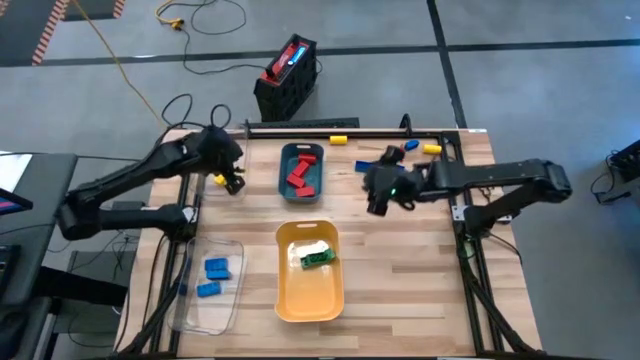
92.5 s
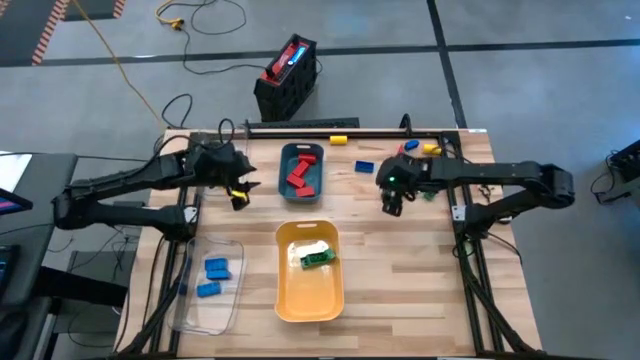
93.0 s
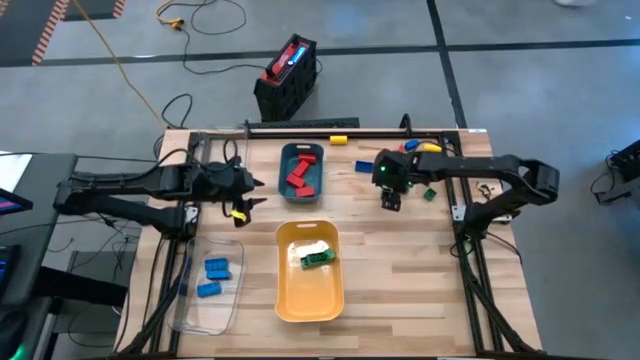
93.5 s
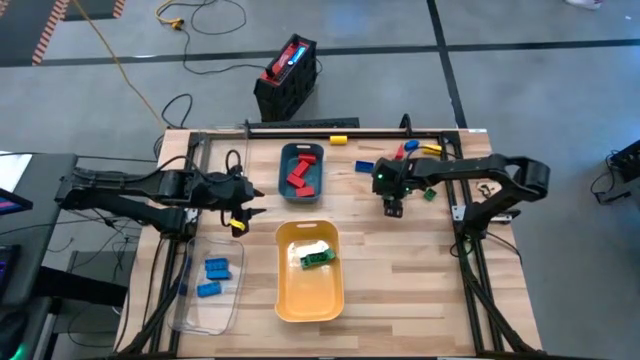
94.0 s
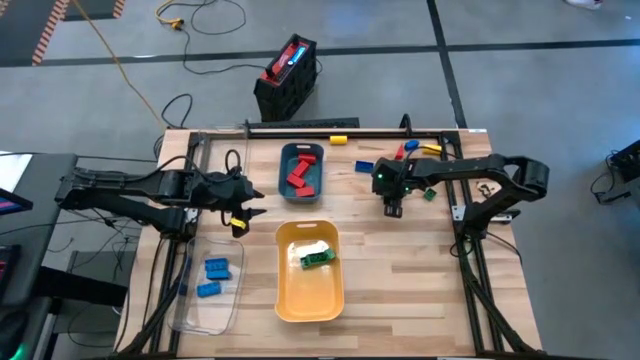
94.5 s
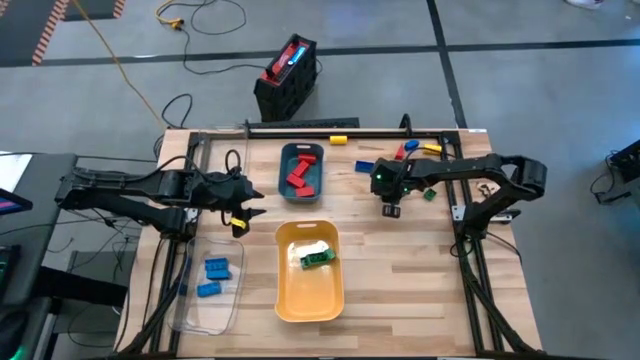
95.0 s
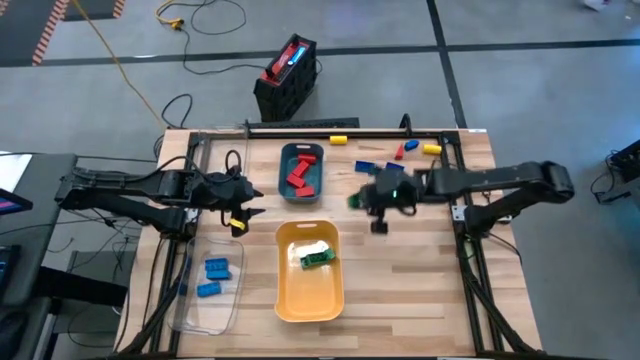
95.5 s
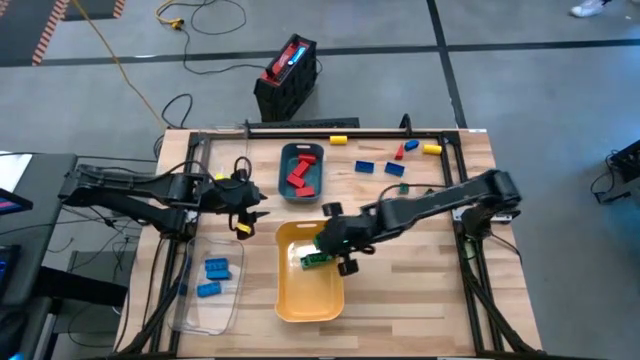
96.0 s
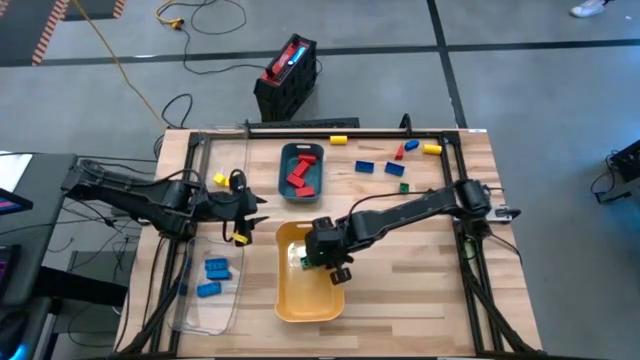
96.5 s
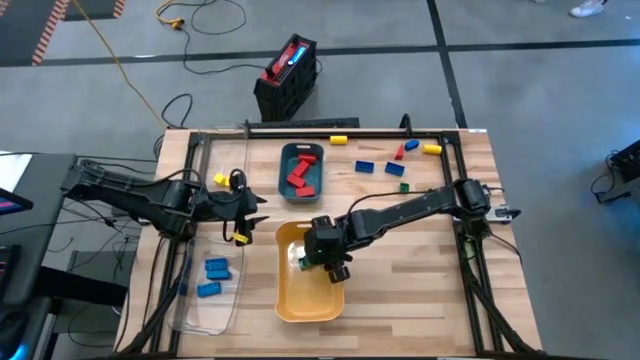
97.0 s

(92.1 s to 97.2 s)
Task: Sort blocks
Put the square green game piece into the yellow bin

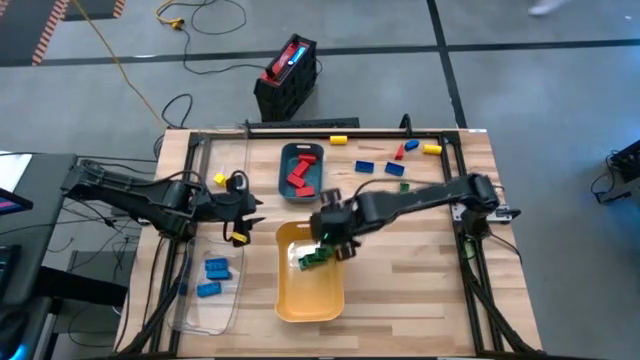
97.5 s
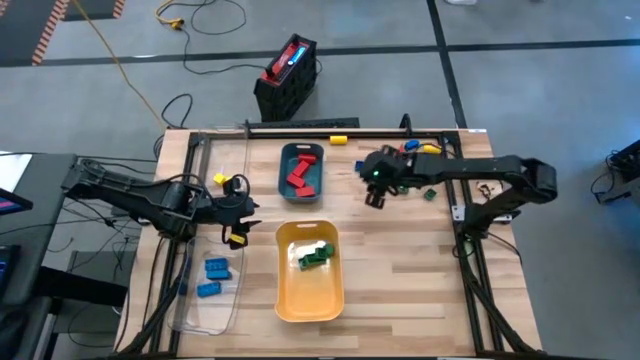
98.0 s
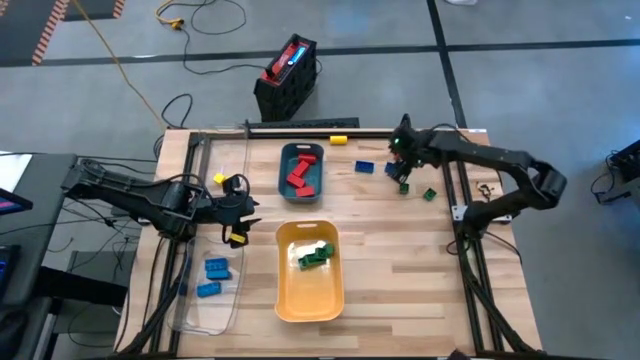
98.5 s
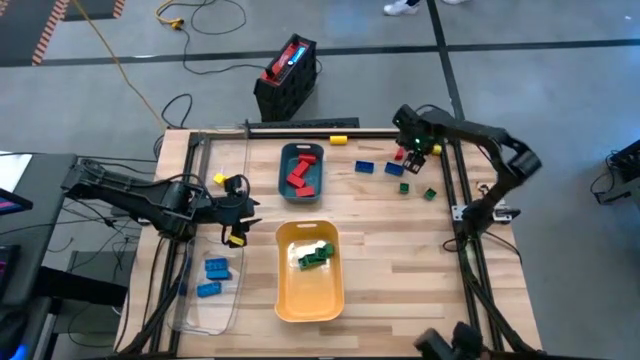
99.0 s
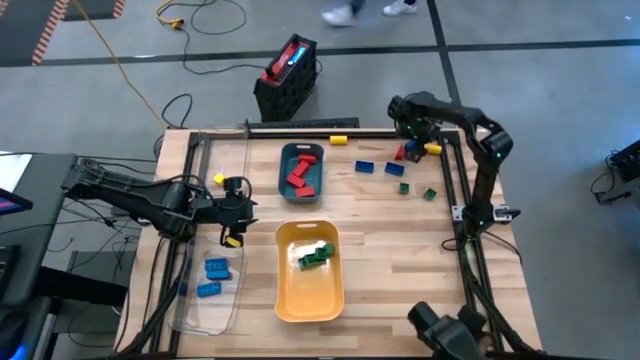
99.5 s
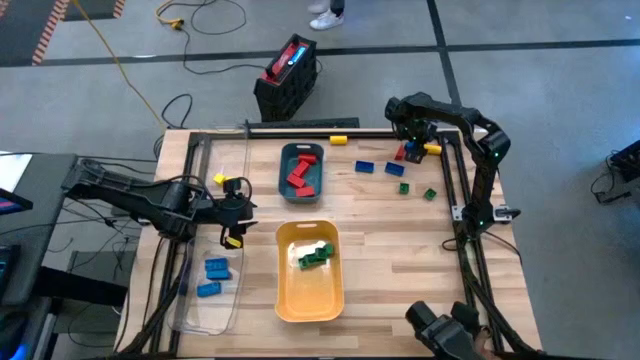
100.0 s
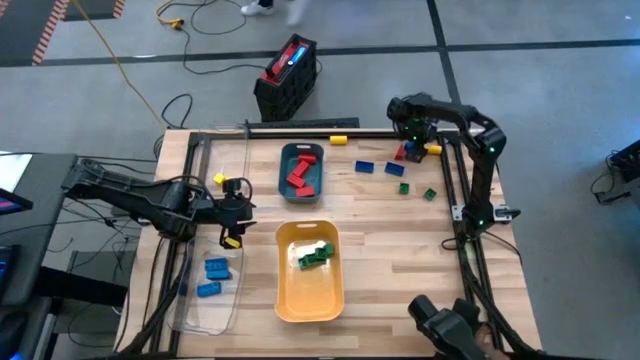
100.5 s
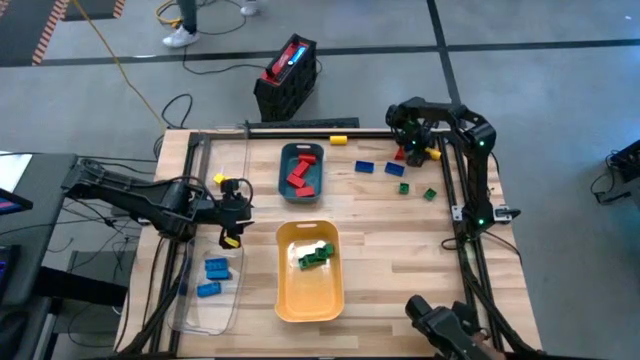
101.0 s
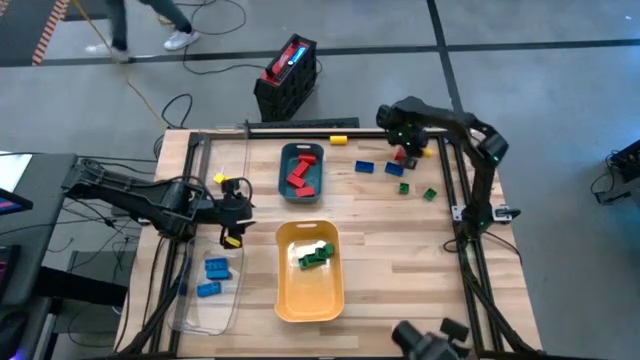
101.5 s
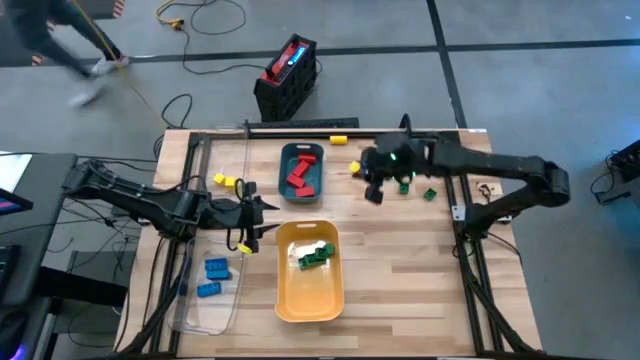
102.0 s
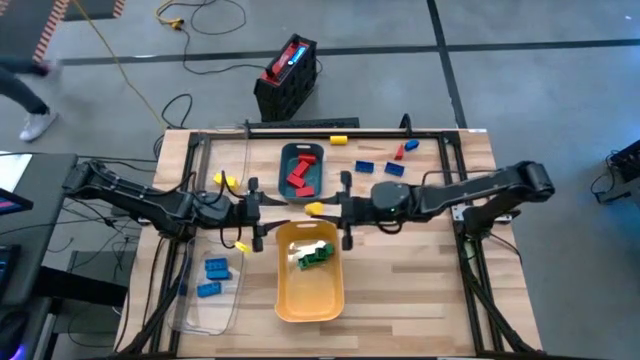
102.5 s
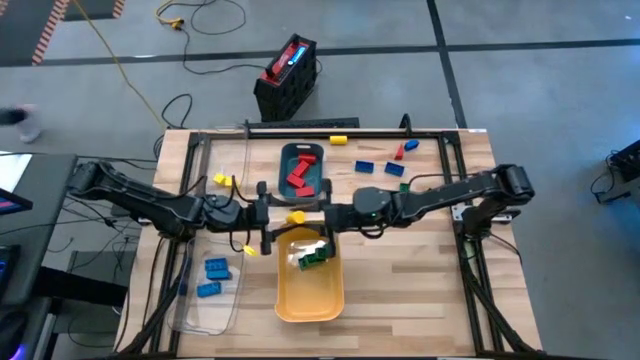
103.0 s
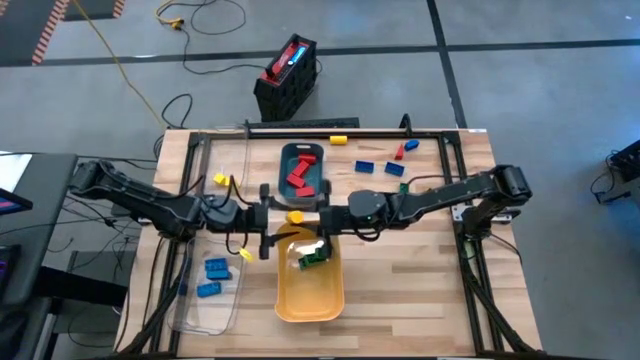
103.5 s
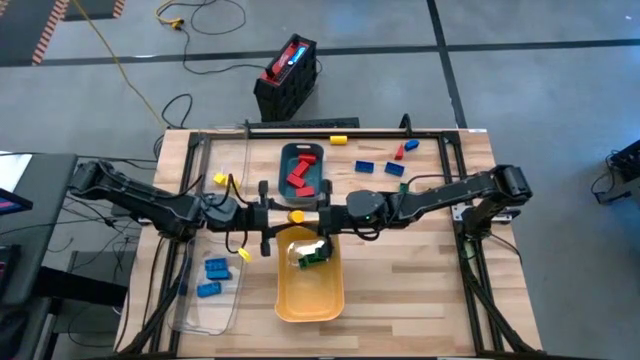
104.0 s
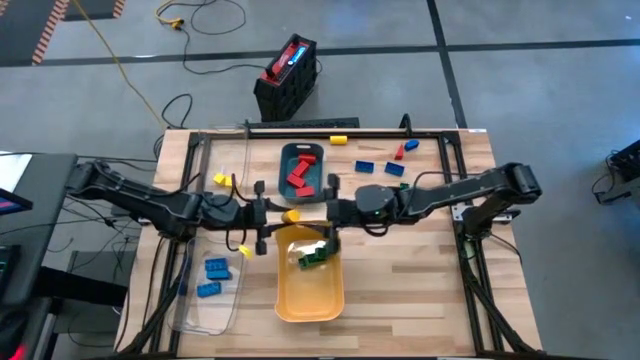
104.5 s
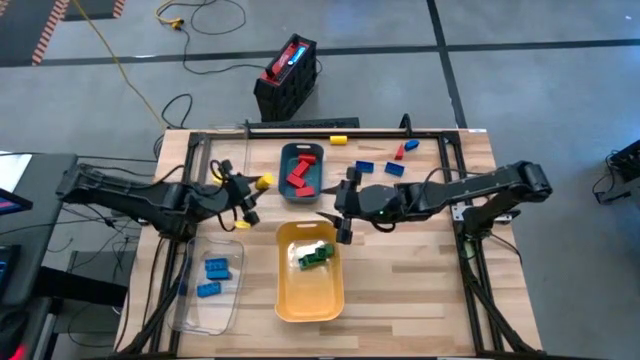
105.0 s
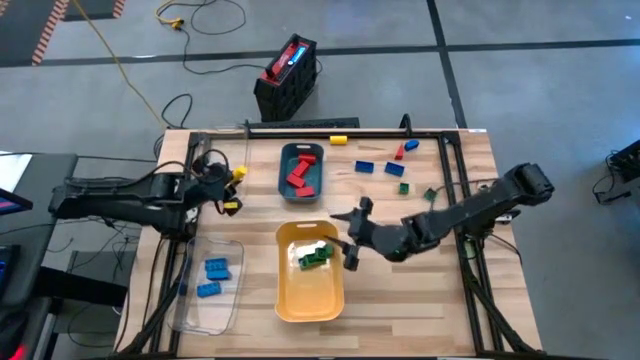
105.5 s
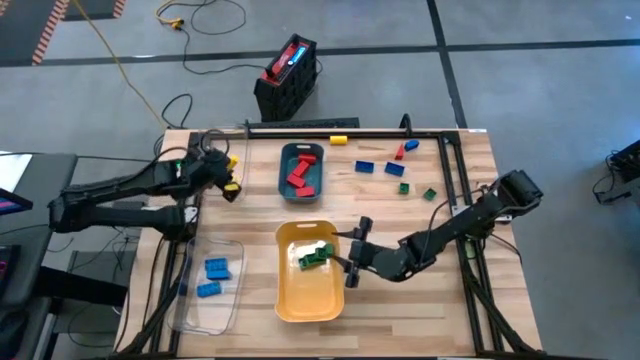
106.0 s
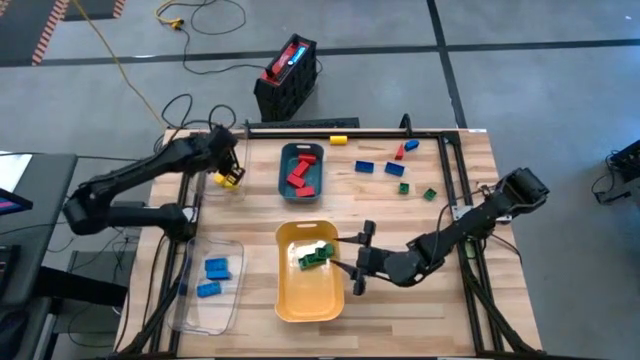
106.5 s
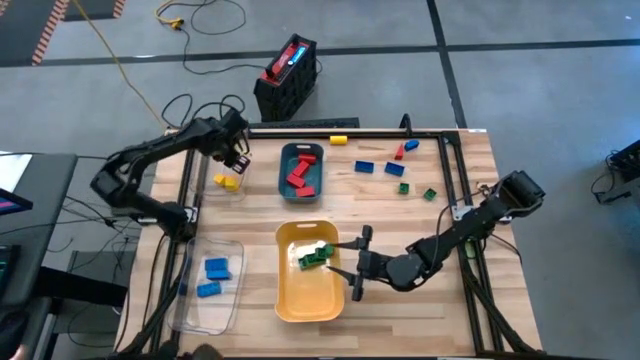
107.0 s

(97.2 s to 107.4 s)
Put the circular yellow game piece into the top left transparent bin

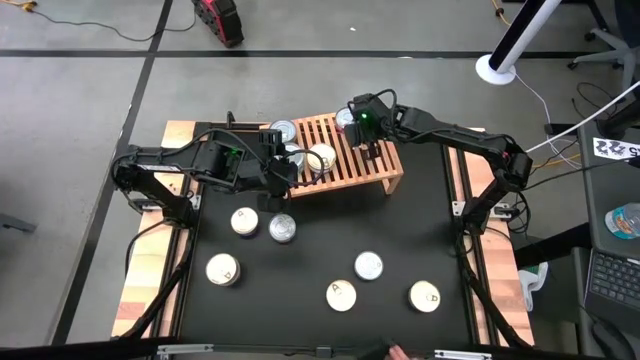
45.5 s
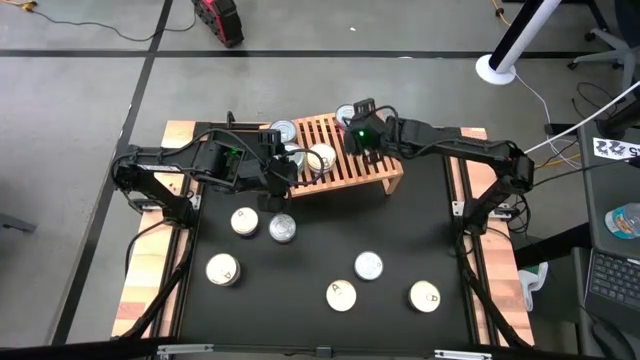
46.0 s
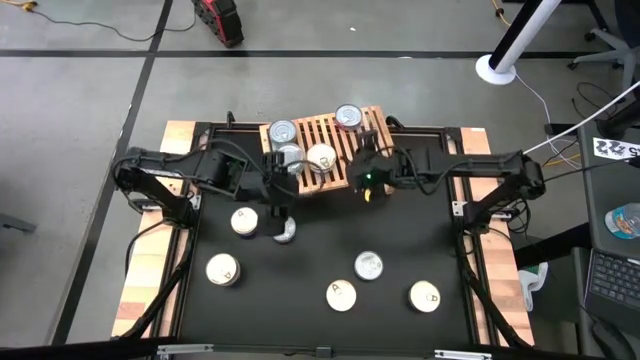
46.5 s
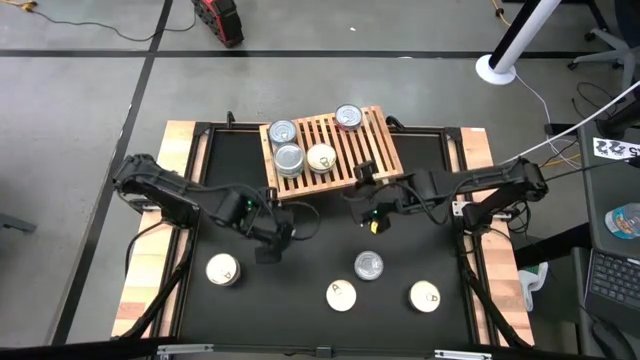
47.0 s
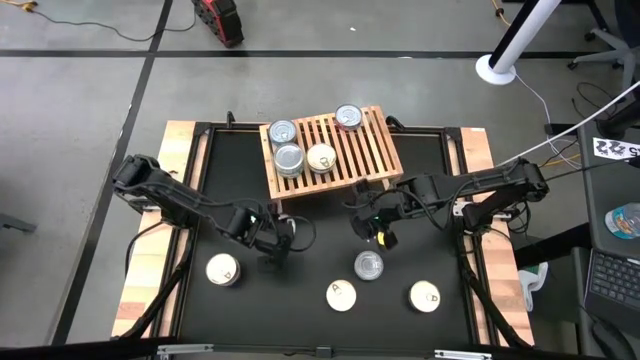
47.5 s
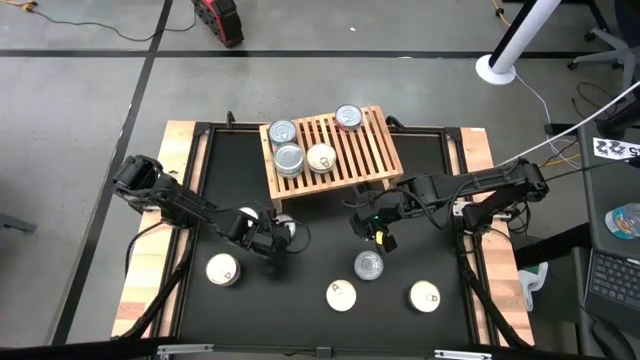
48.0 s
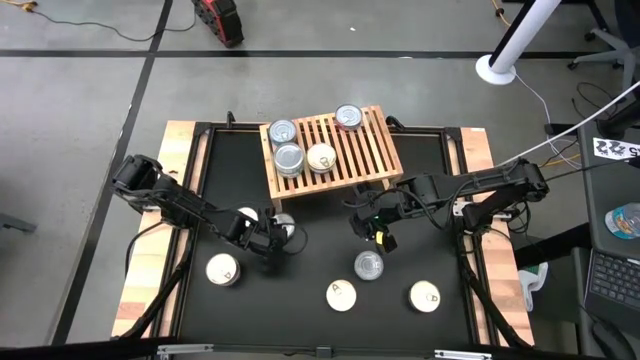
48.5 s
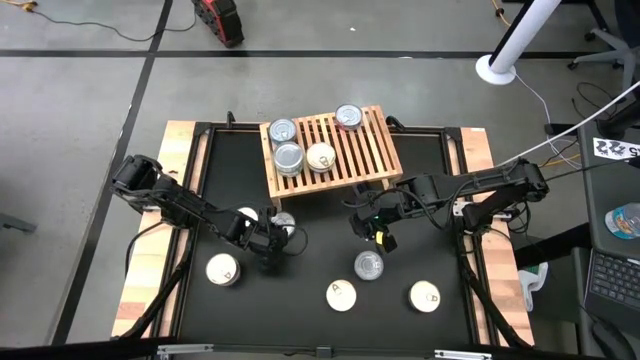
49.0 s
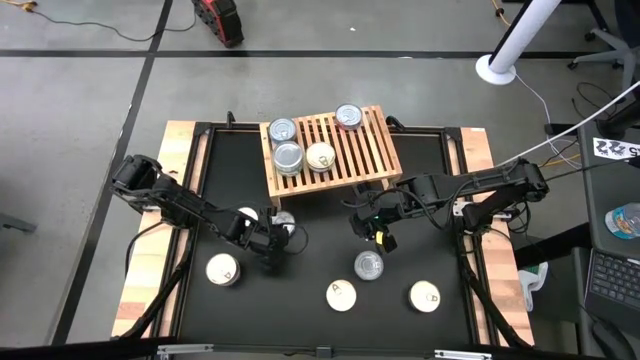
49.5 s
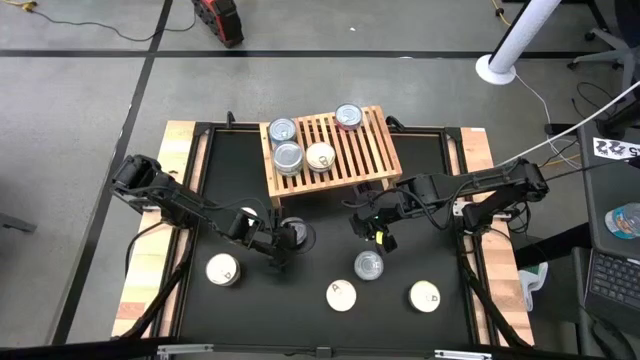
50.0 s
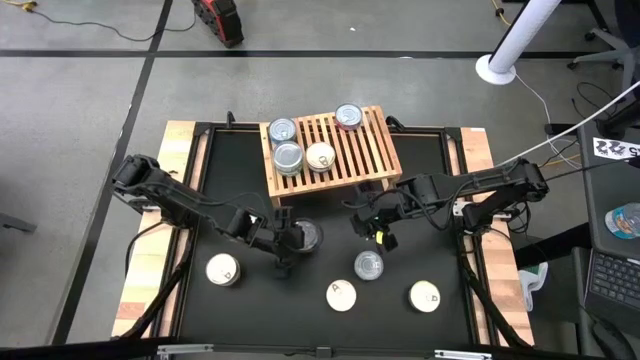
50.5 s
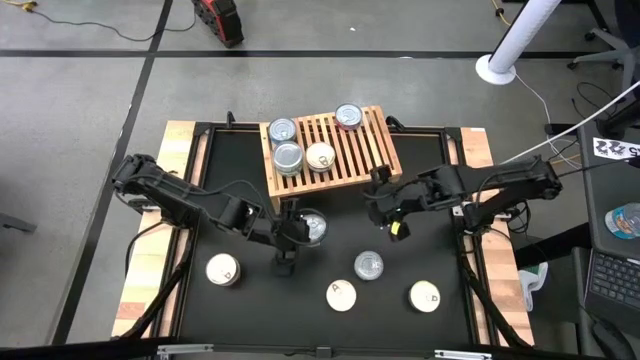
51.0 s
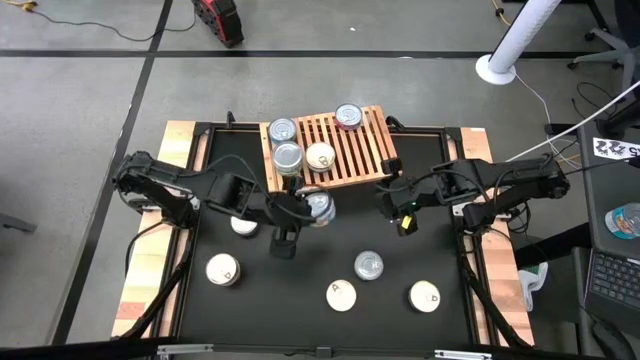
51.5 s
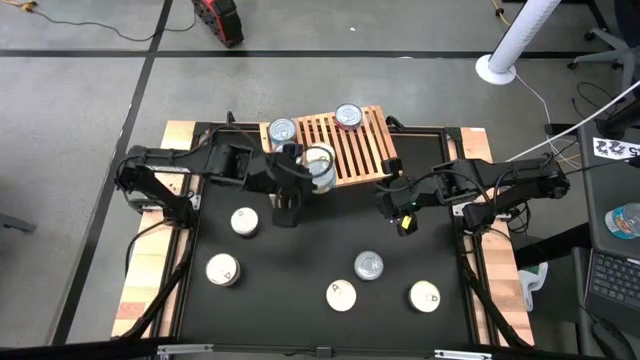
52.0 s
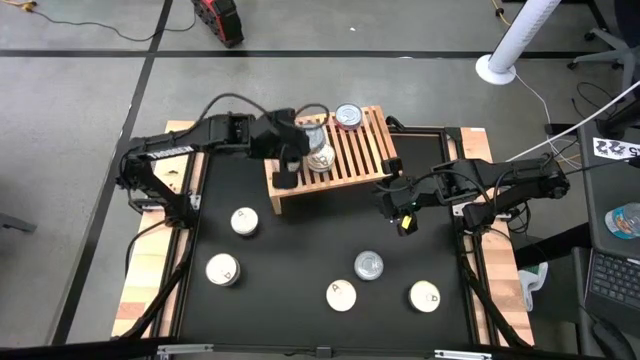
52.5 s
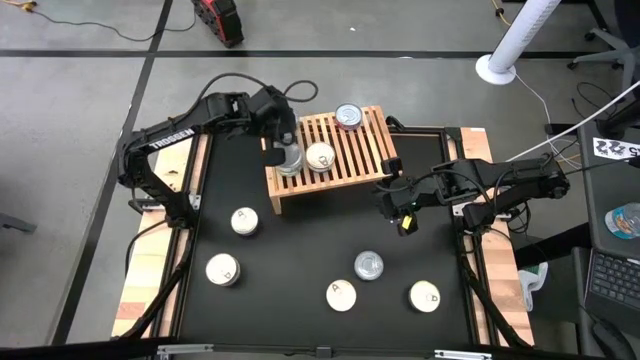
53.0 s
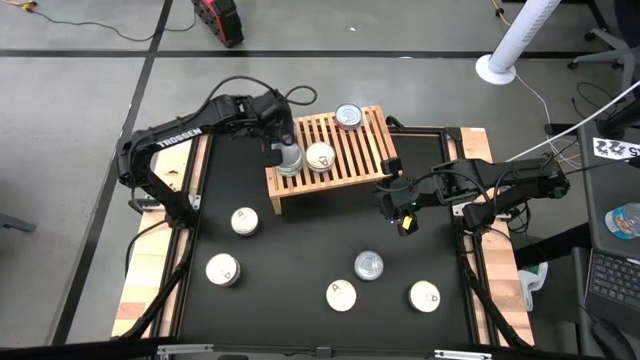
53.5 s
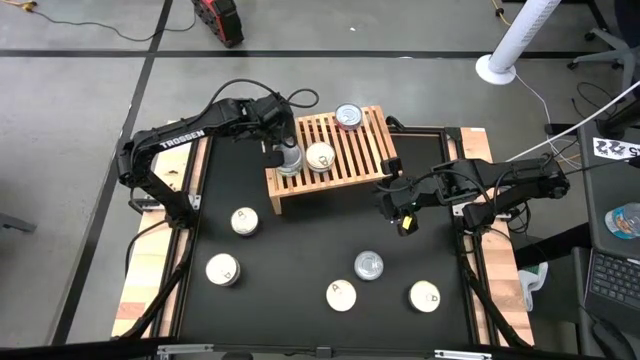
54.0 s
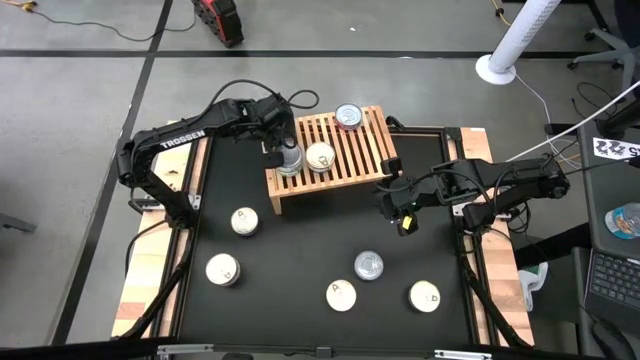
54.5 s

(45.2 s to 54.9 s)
Task: Stack canned seafood by type on shelf
Put the yellow tuna can on the shelf
